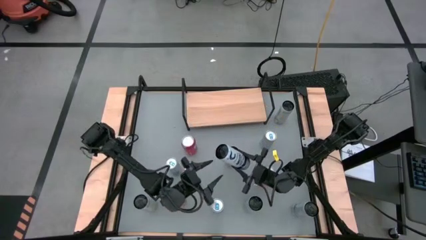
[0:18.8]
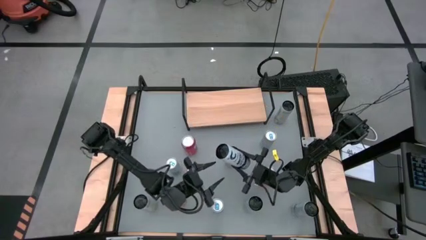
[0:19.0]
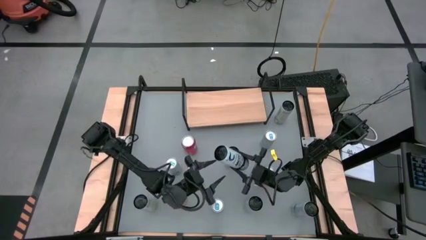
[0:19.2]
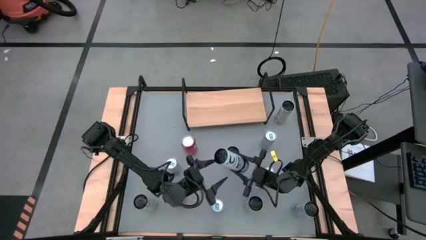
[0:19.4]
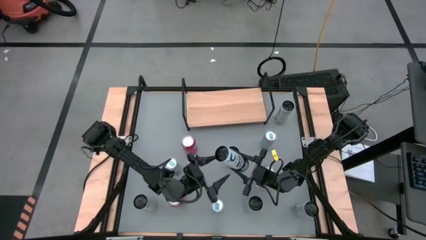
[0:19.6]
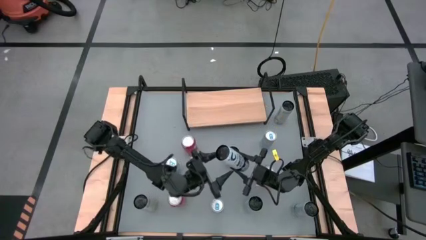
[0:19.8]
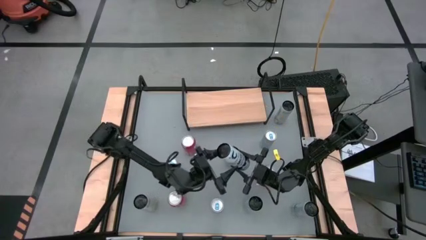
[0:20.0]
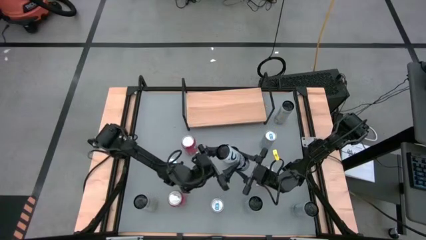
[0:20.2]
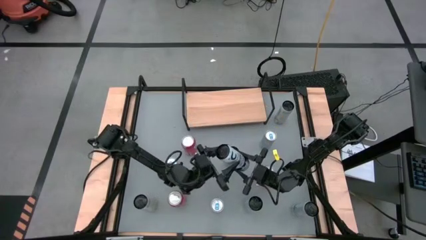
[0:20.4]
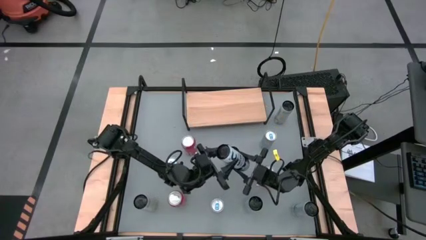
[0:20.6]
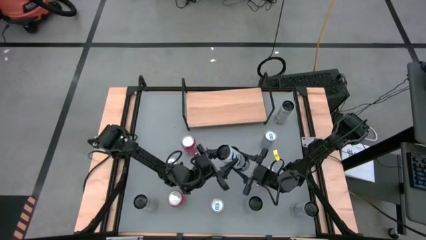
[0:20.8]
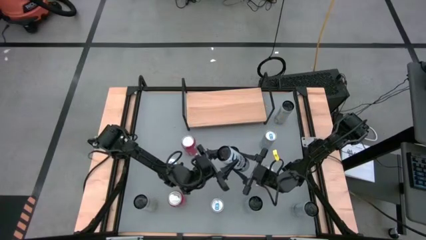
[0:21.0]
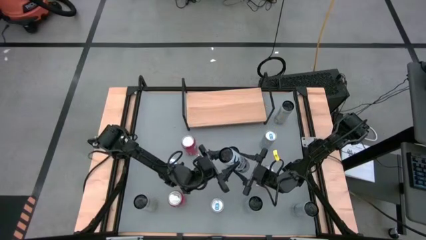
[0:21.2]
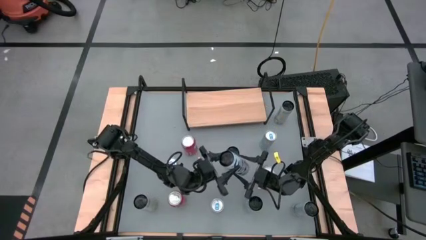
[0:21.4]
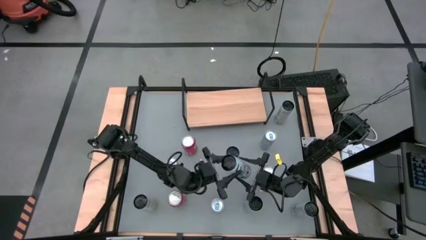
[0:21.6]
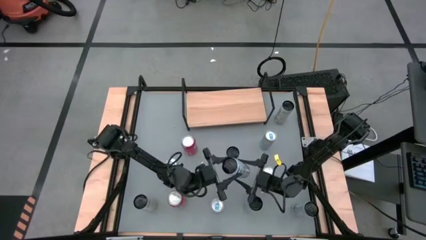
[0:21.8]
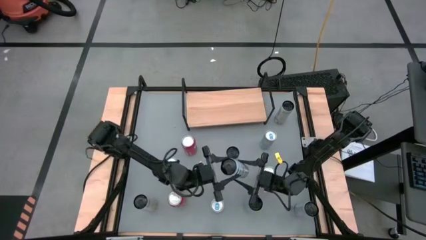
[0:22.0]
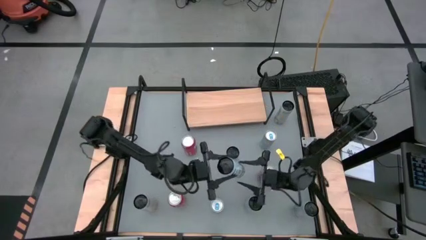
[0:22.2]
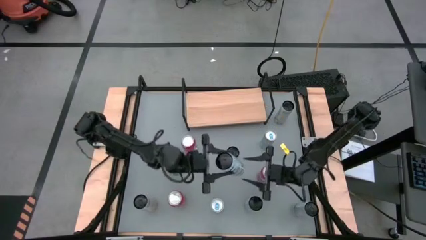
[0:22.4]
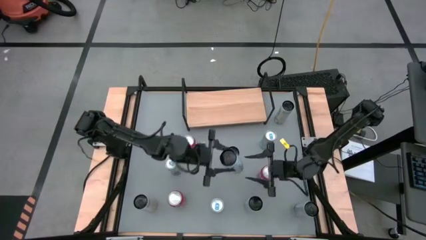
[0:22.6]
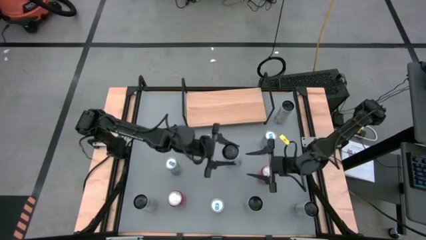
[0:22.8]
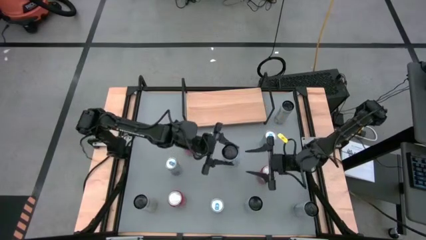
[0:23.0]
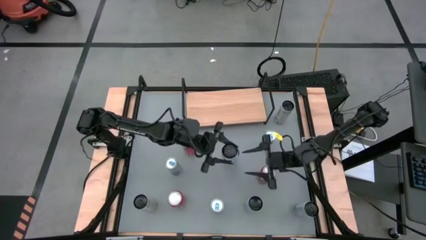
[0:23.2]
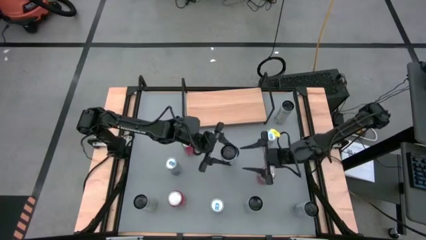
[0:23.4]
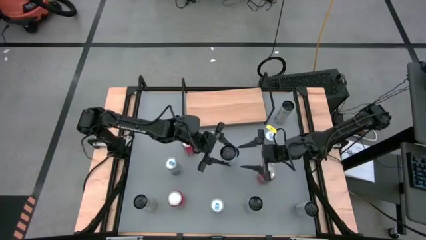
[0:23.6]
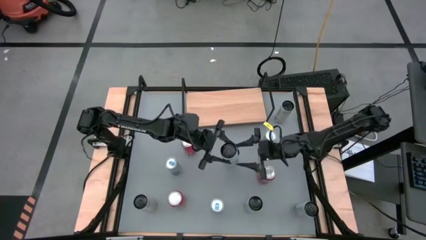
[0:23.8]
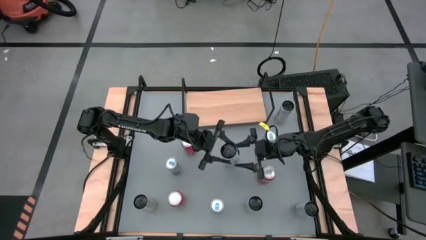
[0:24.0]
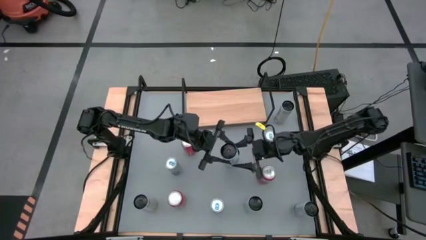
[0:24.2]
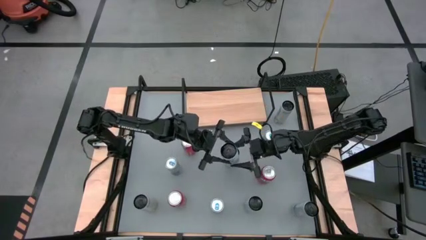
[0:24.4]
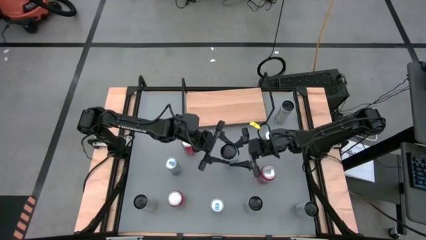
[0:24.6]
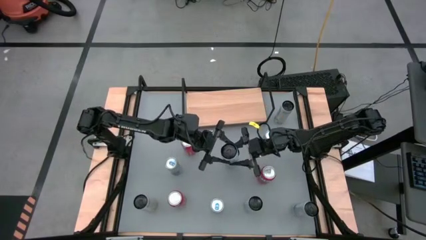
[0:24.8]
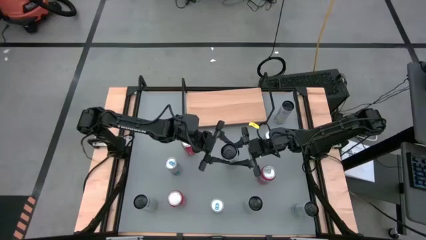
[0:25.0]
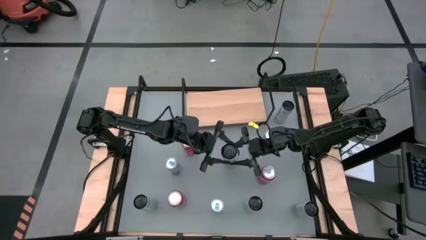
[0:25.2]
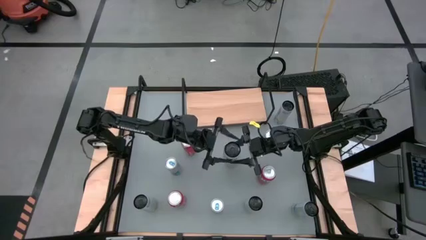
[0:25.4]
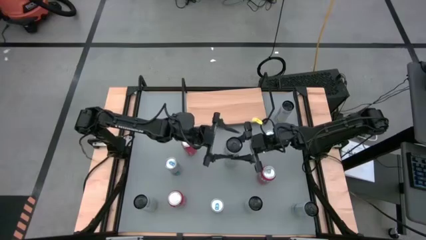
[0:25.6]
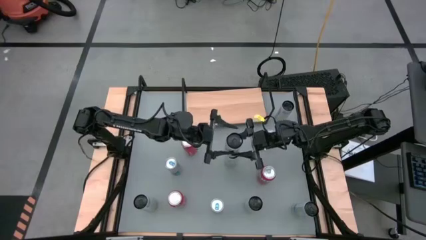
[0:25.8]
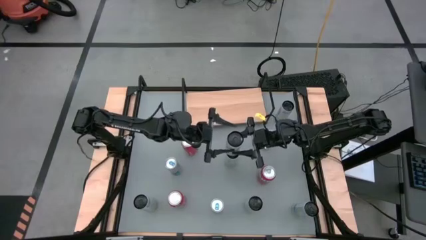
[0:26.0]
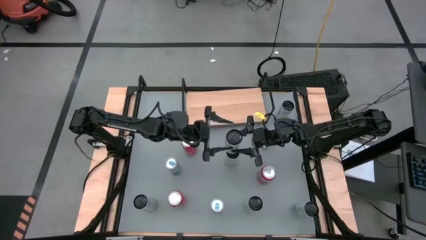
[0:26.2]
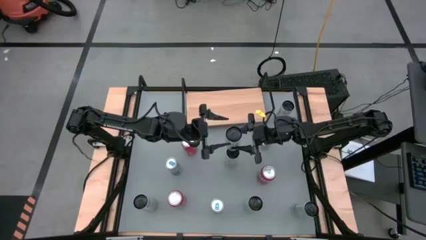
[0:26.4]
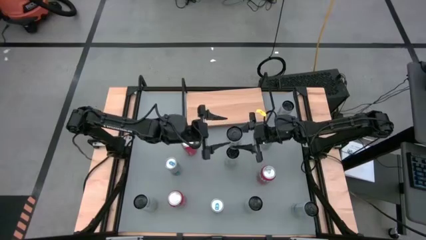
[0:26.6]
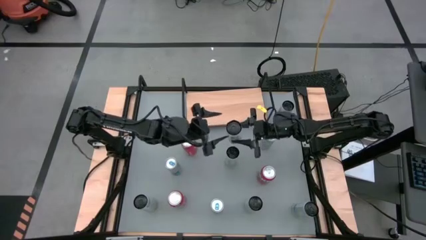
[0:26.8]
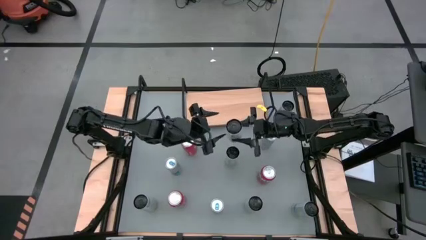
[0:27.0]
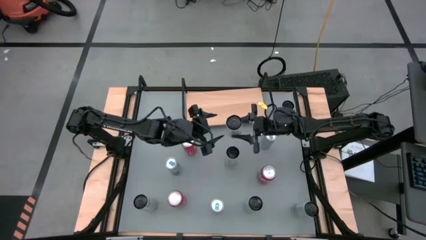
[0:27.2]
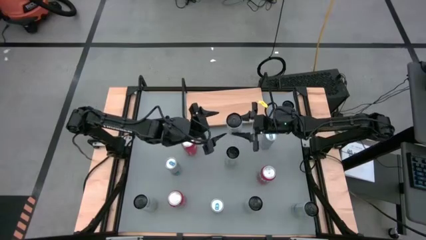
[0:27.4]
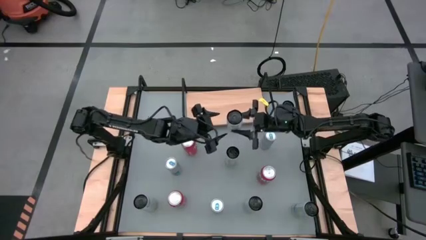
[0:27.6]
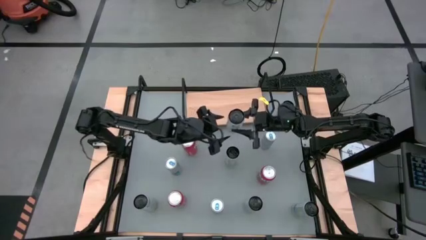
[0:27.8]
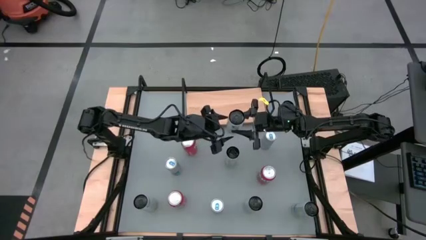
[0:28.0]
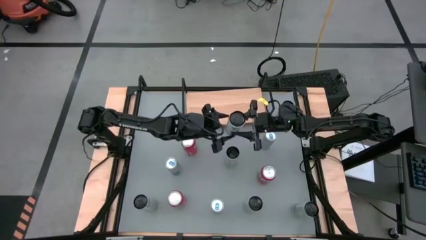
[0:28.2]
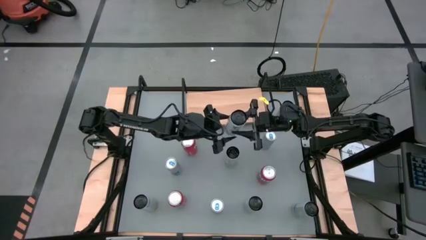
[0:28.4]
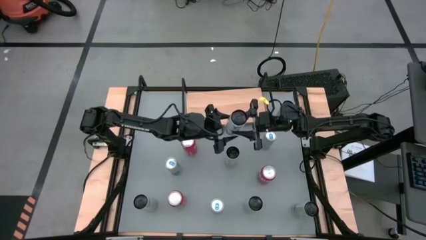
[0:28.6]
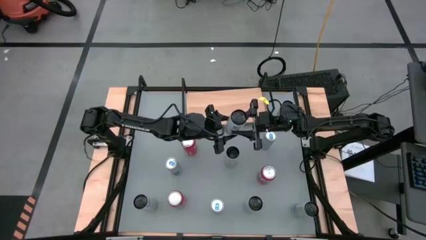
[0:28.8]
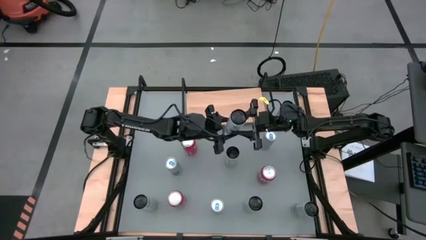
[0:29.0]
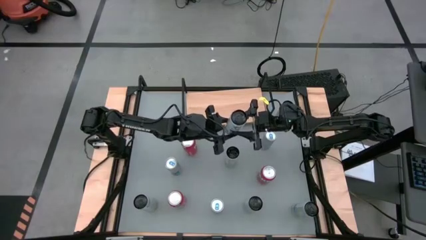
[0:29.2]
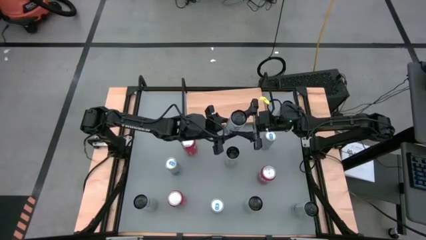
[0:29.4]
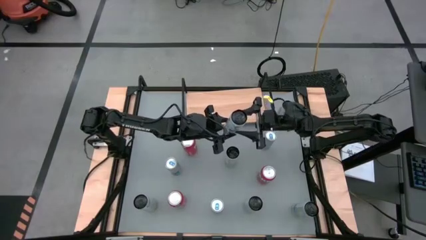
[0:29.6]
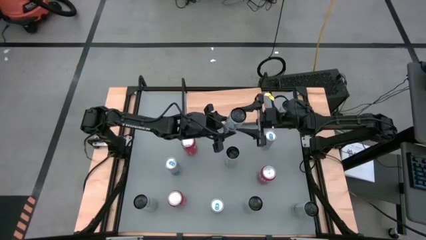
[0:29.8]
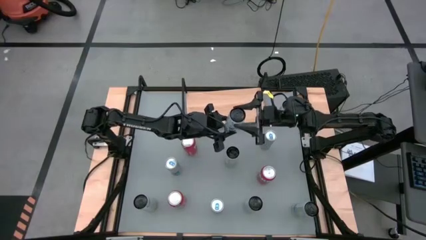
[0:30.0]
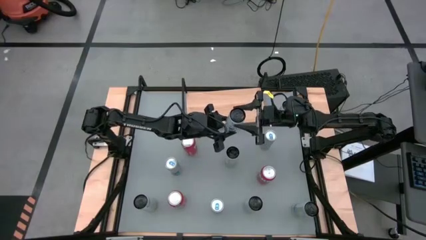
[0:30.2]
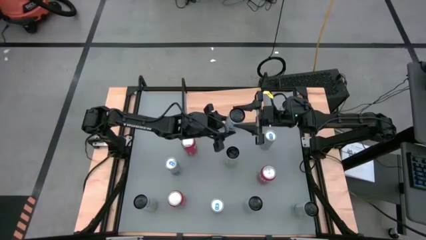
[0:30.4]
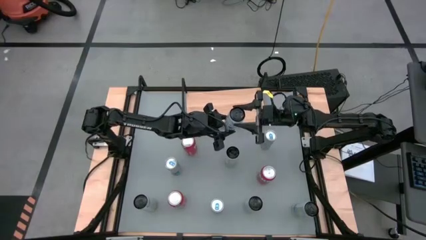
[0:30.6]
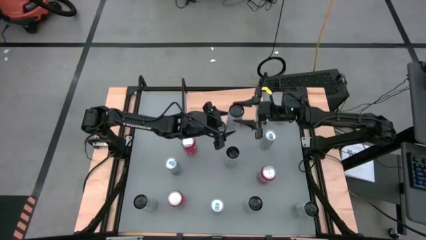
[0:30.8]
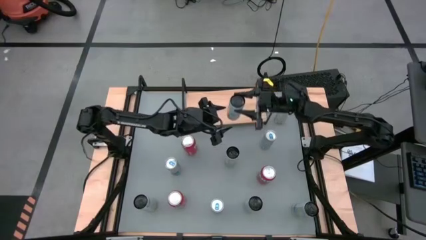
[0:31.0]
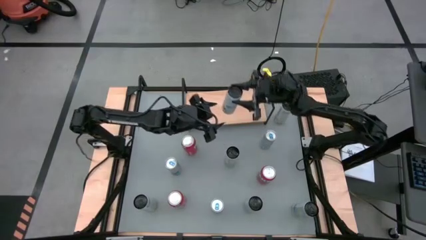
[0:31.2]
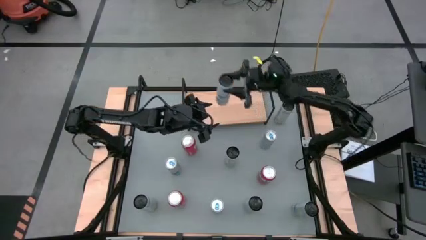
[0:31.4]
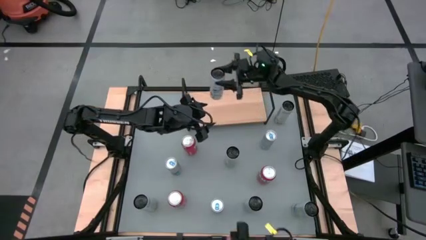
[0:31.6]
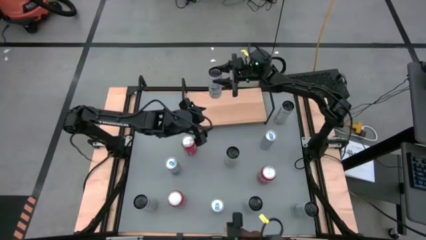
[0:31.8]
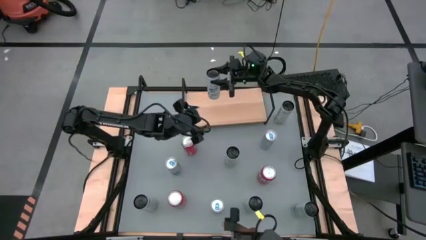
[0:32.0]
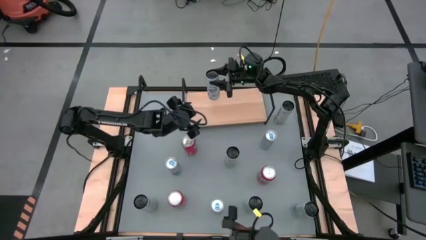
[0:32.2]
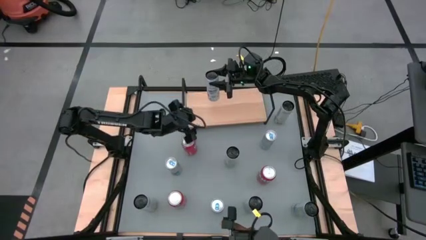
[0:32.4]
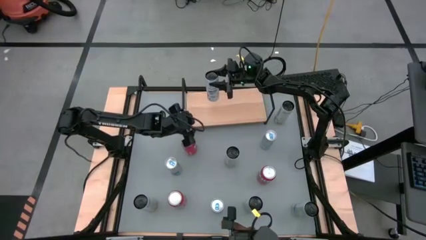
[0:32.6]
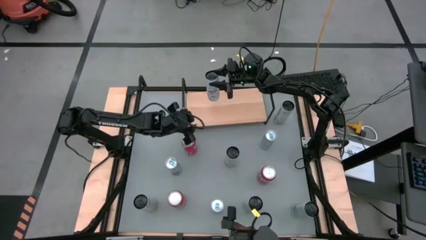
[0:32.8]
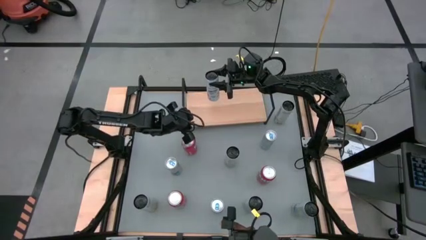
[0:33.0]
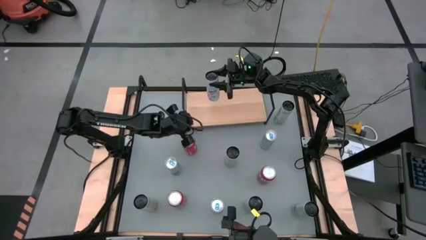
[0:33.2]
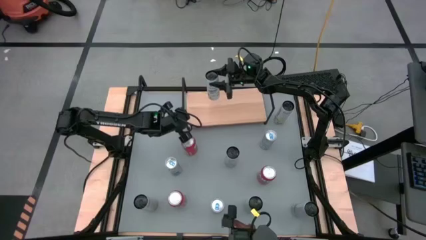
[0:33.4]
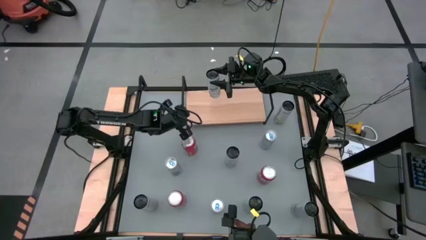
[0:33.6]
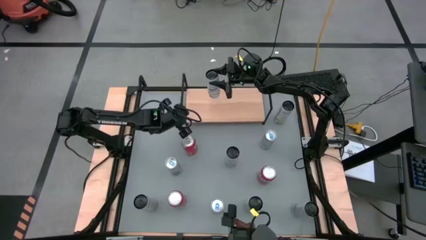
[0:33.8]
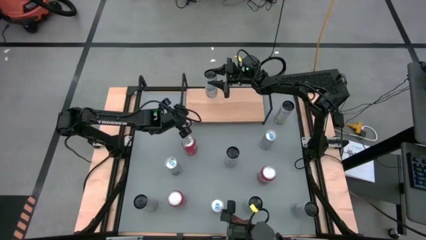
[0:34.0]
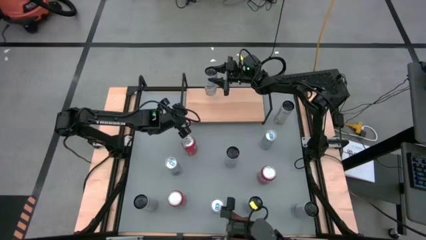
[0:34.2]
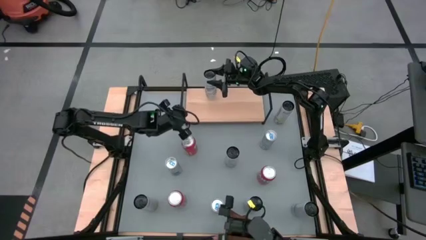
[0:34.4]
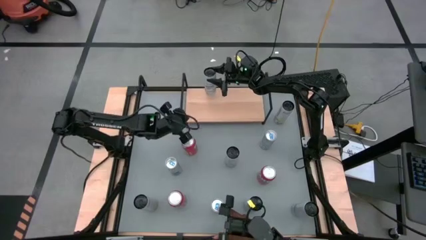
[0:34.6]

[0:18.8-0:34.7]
Task: Place canned beverage on shelf
Put the top left white blue soda can on the shelf
